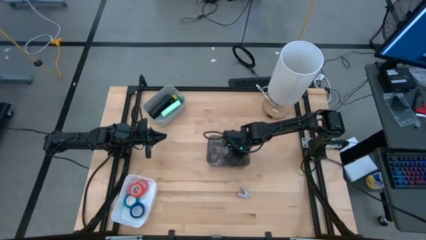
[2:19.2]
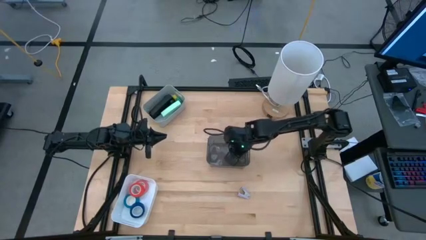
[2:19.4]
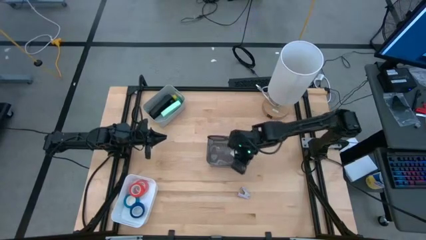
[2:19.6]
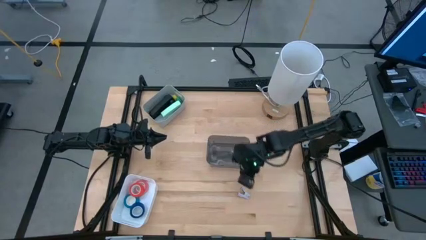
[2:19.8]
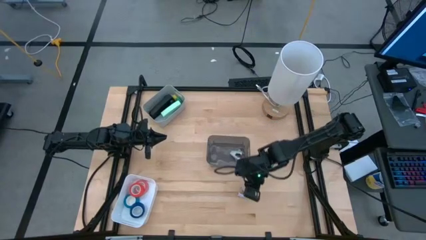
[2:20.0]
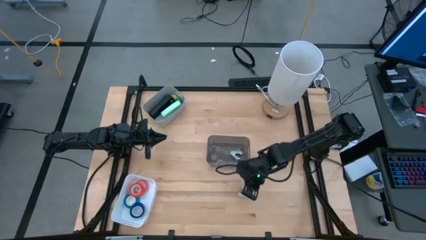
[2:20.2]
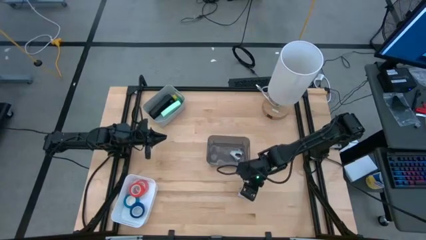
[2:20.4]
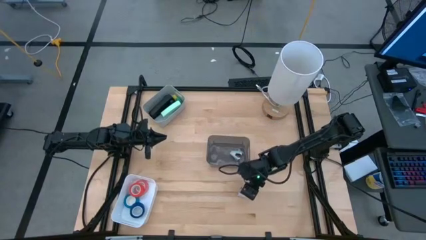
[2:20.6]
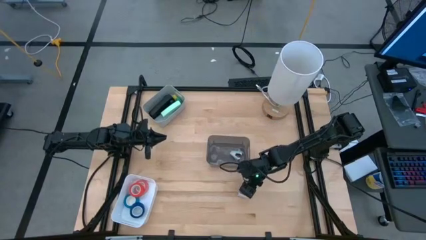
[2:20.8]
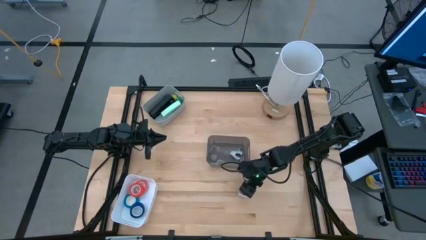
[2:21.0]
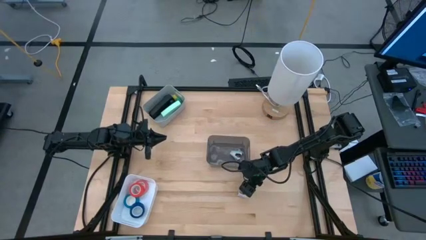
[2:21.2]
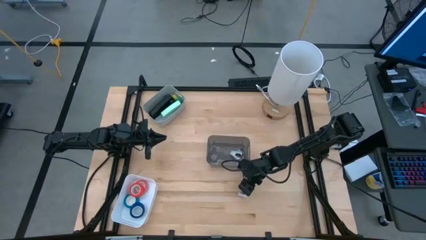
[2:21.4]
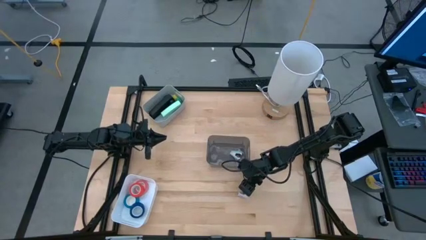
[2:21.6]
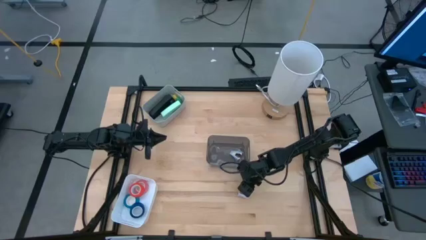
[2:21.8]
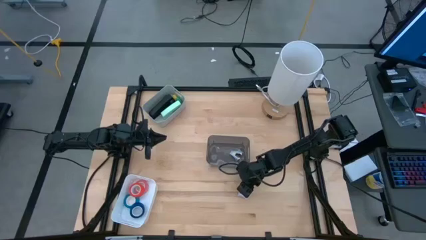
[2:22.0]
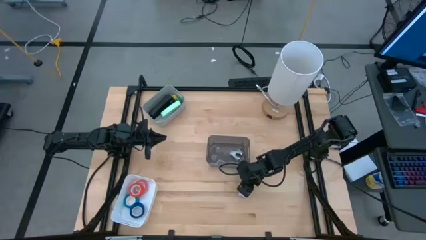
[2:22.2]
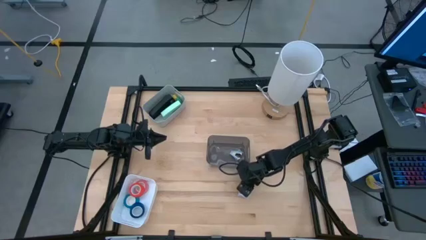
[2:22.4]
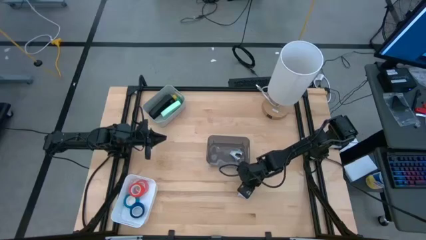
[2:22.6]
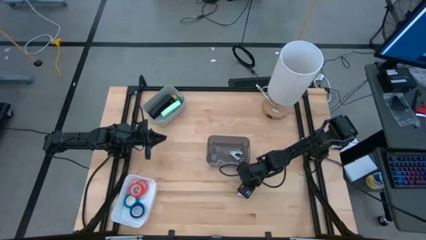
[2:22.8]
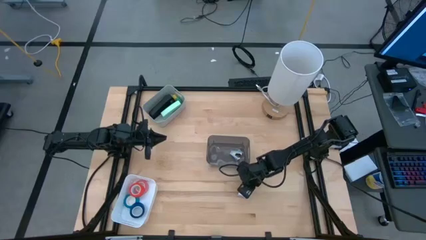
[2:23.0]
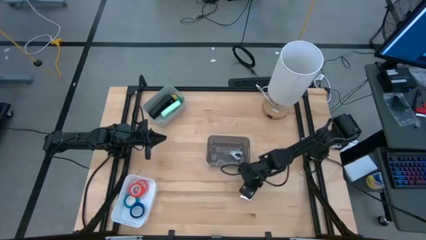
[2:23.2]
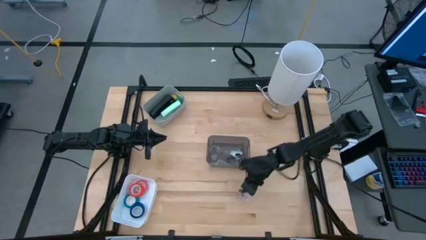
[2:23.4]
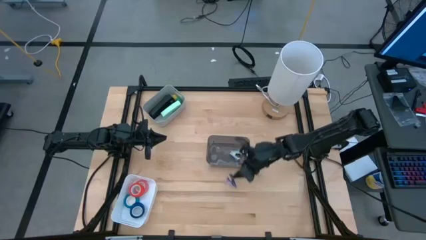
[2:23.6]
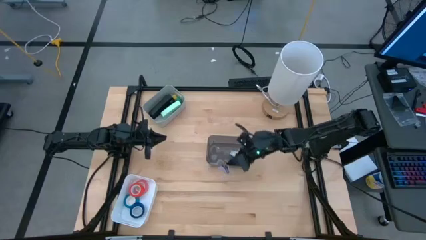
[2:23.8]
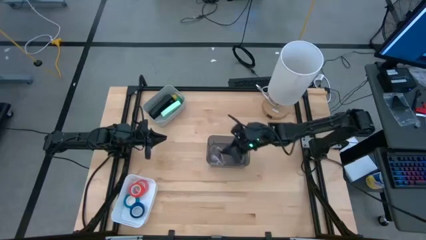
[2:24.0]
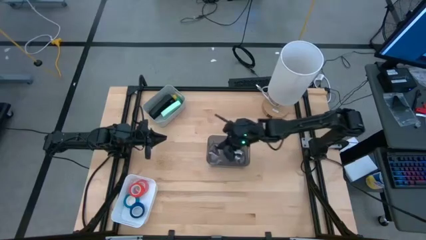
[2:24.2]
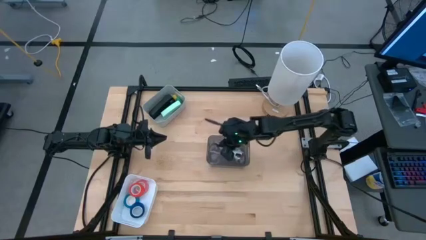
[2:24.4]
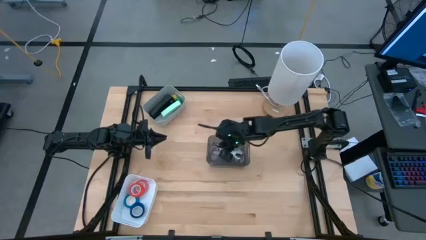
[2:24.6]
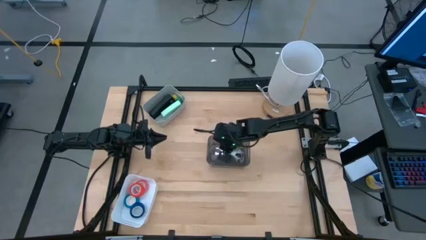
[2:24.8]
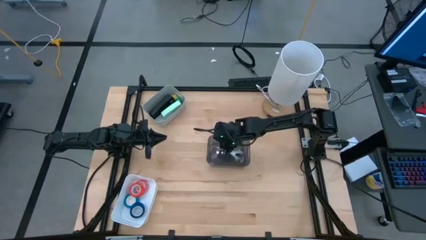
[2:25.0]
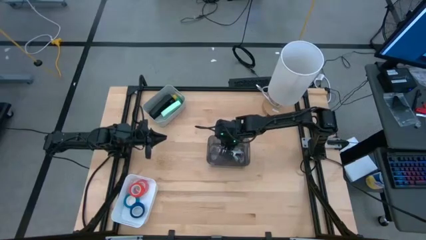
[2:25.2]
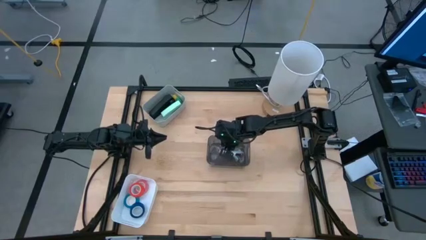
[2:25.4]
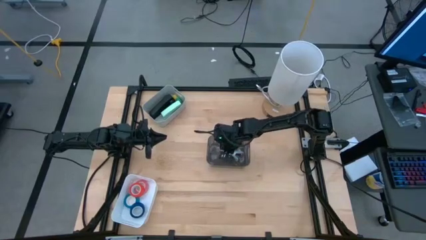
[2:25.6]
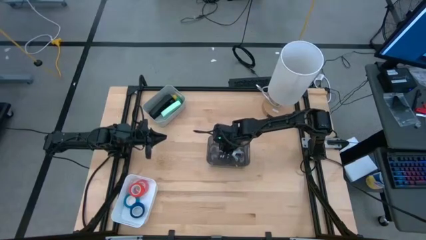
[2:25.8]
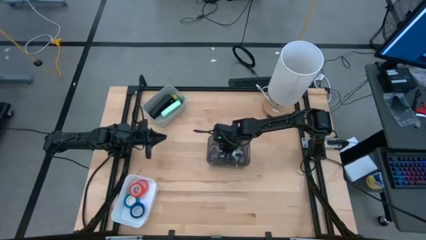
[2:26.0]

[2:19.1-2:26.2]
Task: Pick and place Stapler, Stapler remover, tape
Put the purple staple remover into the black bin

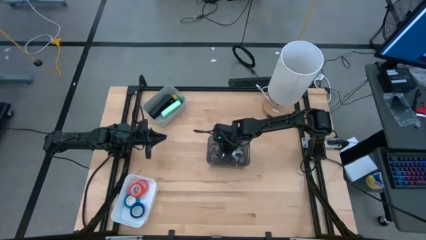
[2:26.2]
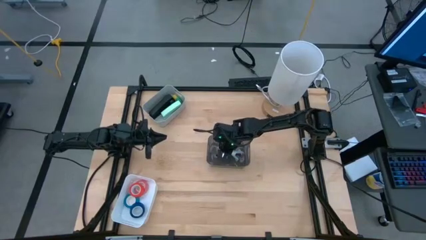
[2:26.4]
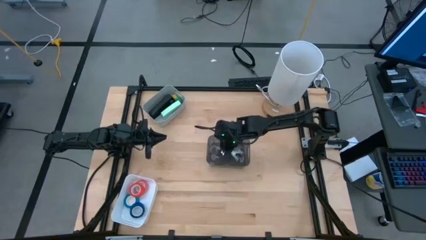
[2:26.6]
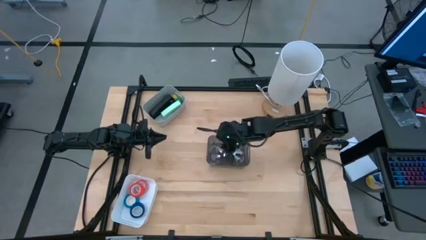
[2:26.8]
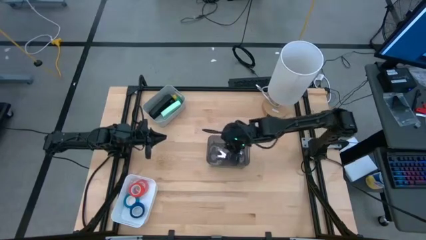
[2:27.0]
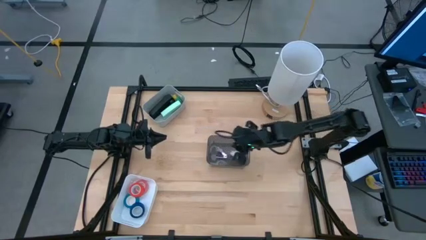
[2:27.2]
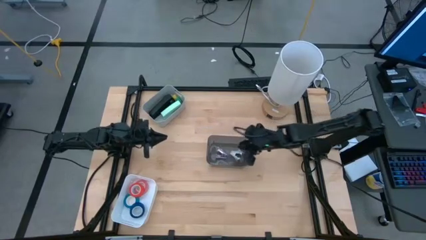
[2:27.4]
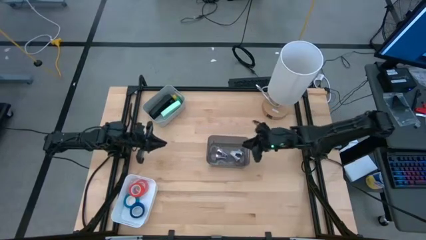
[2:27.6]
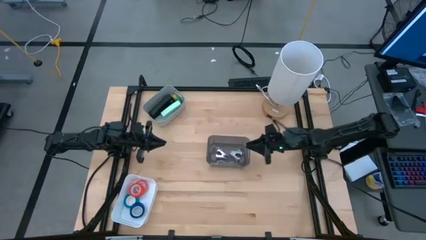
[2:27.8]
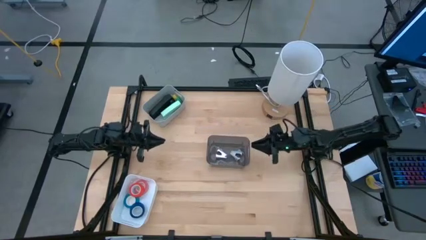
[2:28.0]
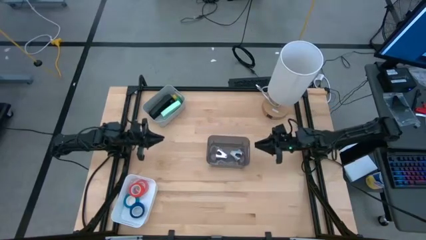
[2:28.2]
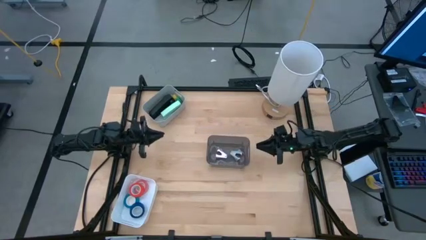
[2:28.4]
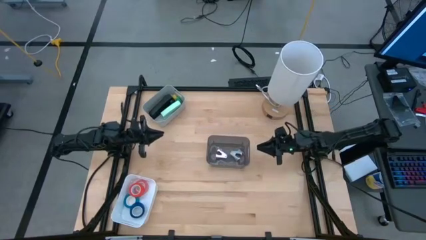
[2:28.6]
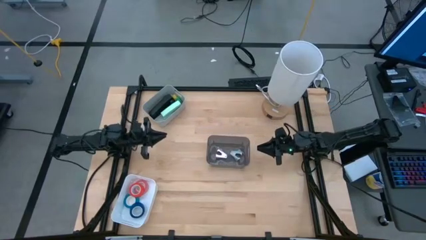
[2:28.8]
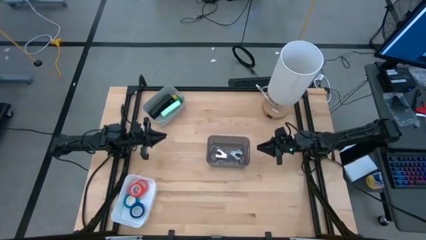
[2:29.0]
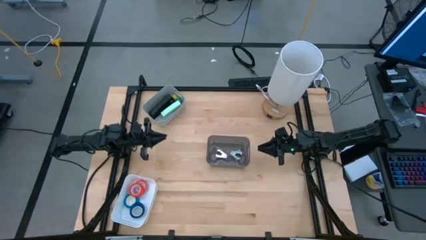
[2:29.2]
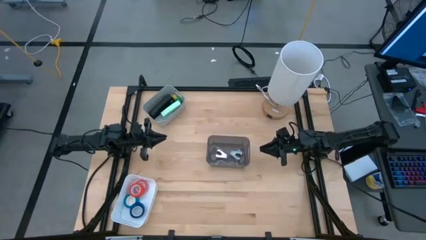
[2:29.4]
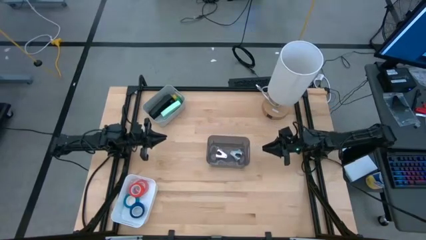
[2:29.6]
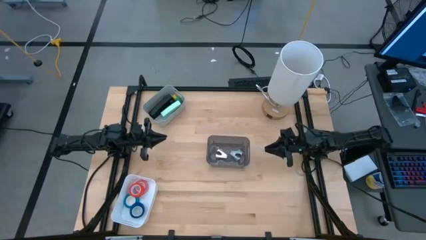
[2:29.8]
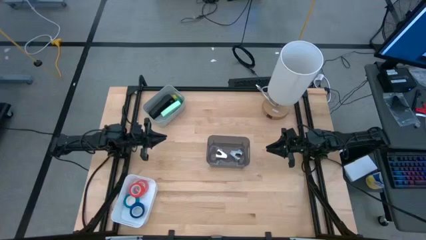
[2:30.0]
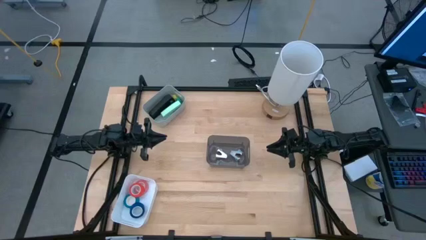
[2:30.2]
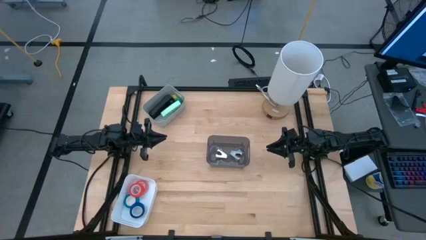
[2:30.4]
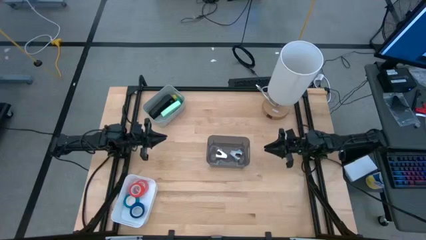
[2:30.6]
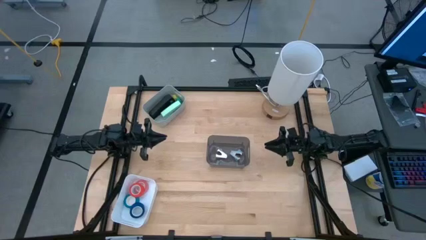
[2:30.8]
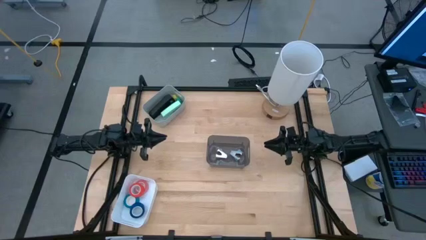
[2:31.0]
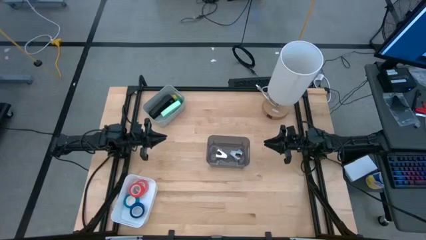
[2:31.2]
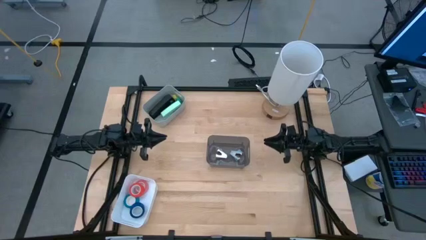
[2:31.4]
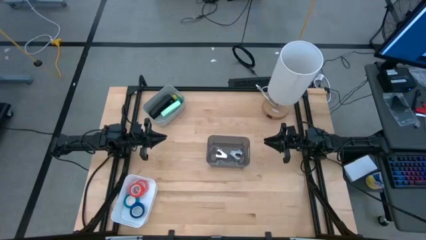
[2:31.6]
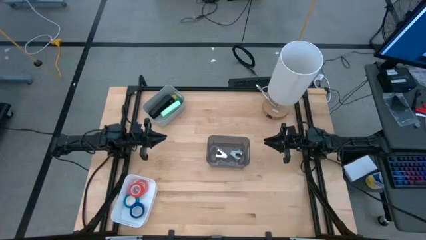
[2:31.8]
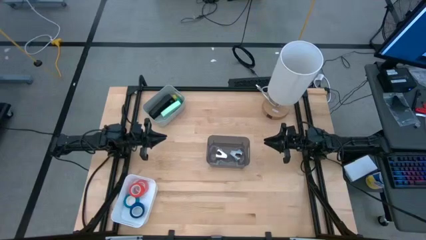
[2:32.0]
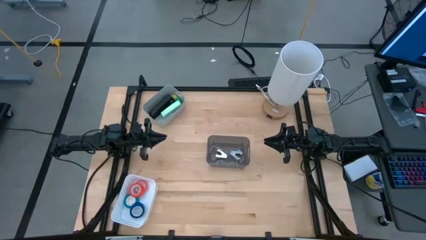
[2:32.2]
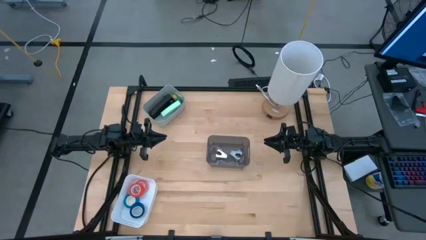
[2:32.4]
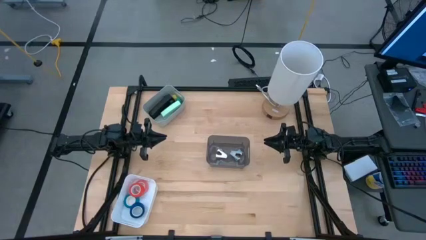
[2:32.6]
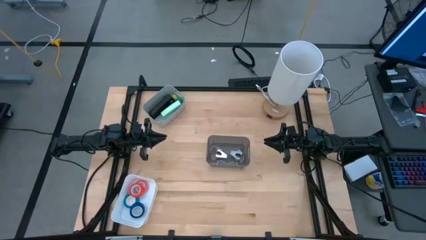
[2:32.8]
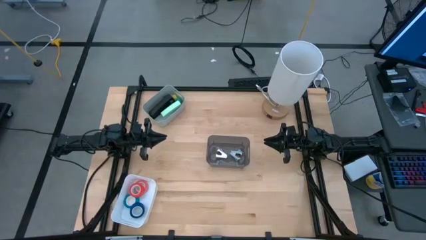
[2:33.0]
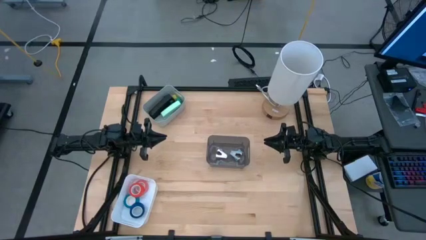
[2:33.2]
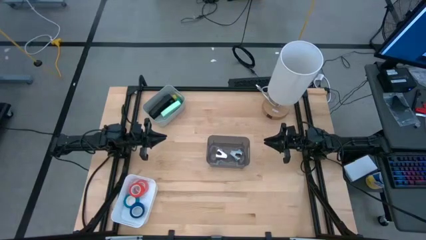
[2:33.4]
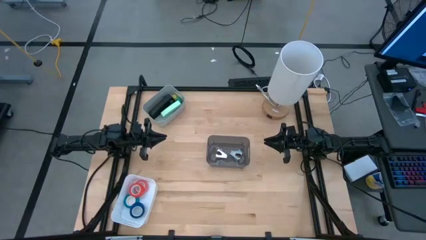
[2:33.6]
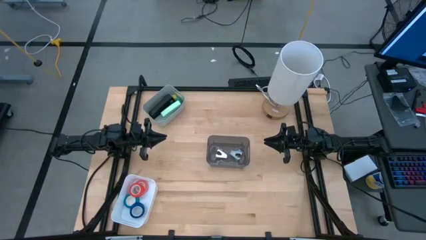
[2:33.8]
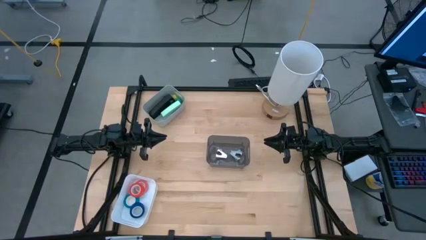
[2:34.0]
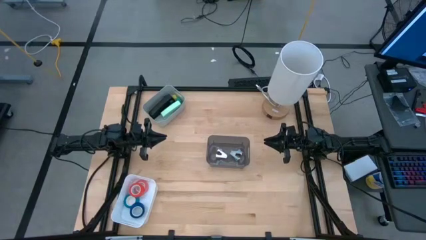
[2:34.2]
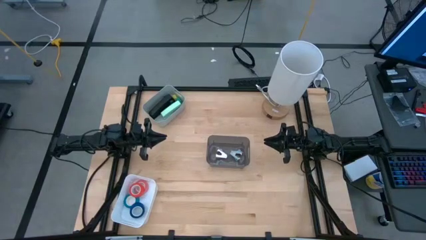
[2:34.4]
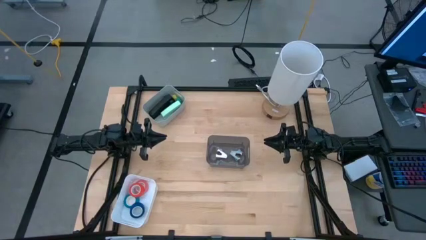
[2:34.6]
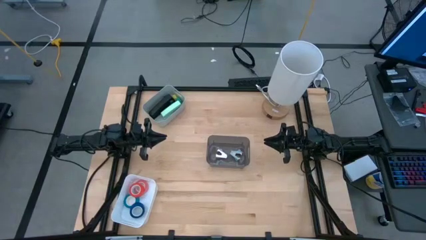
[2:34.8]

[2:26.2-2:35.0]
Return to Home Position

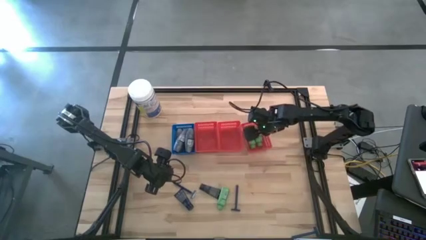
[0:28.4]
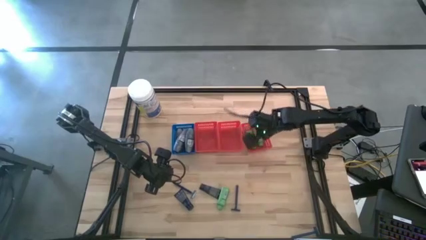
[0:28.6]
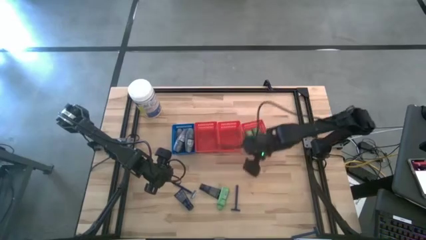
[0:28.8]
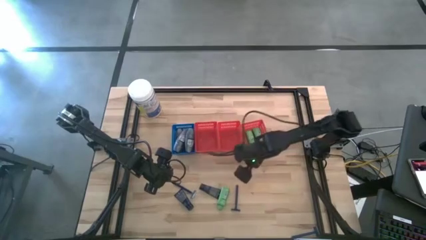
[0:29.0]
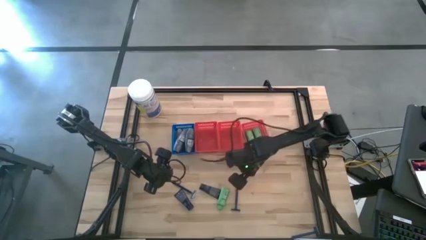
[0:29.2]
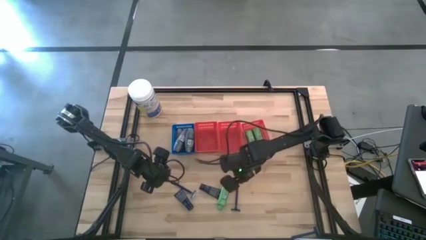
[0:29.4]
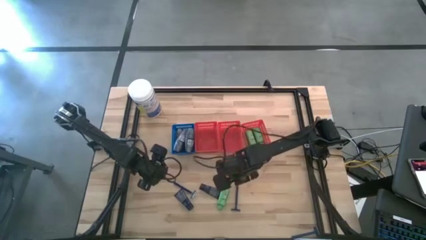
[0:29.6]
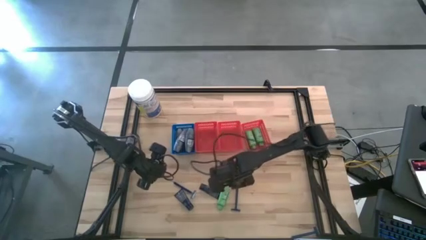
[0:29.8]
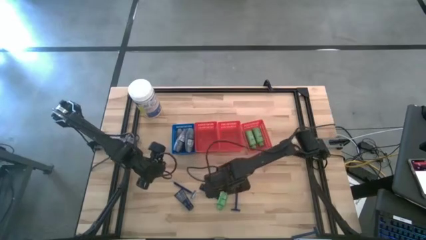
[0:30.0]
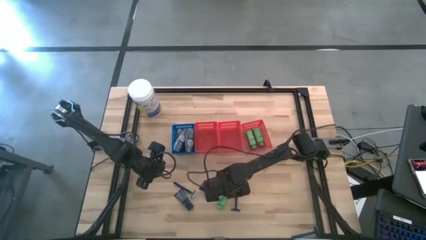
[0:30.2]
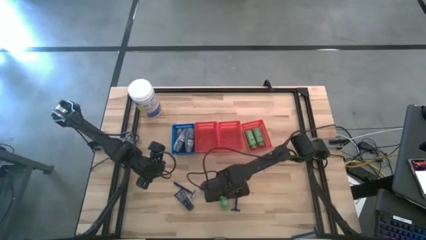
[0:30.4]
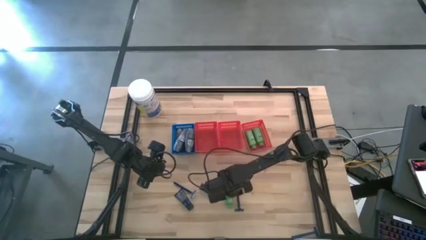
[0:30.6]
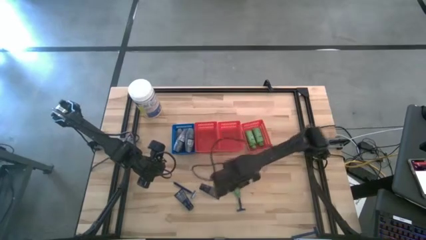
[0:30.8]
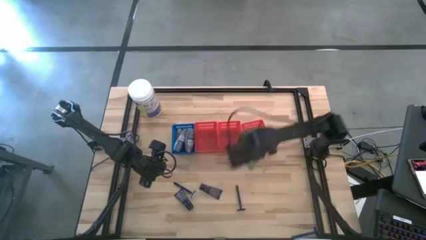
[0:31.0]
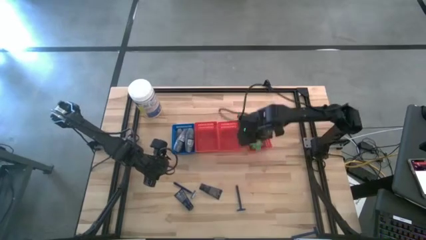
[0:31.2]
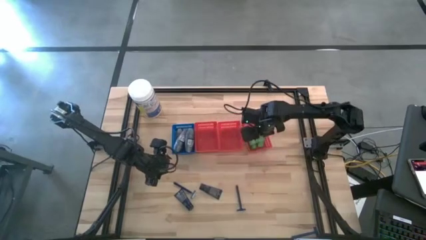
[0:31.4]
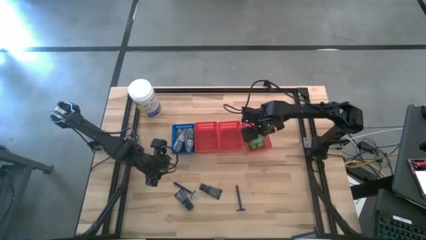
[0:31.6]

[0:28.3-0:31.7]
Task: Pick & Place Travel size toiletries
Put the shampoo into the right red bin
